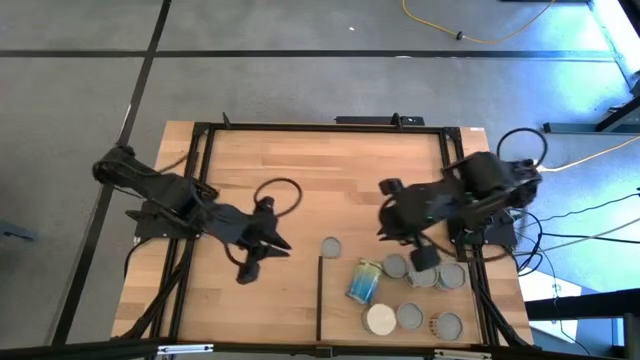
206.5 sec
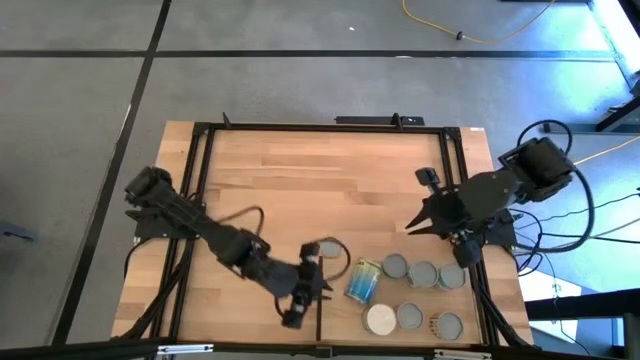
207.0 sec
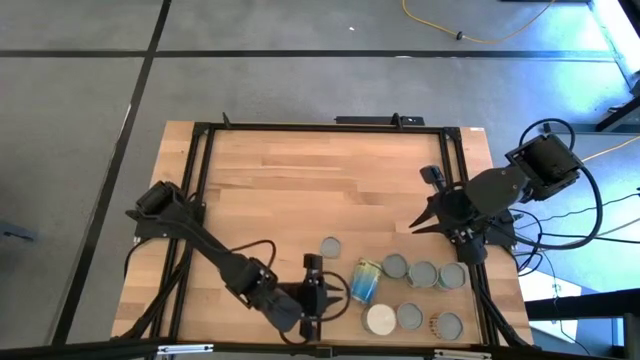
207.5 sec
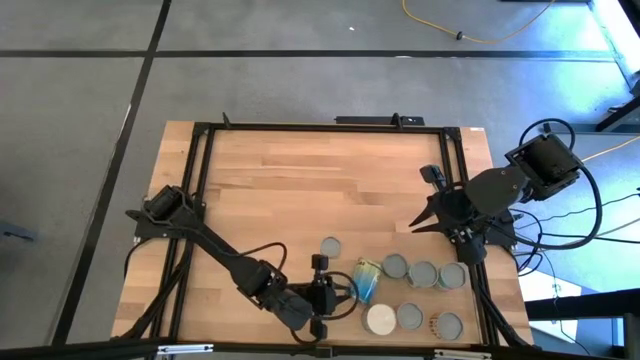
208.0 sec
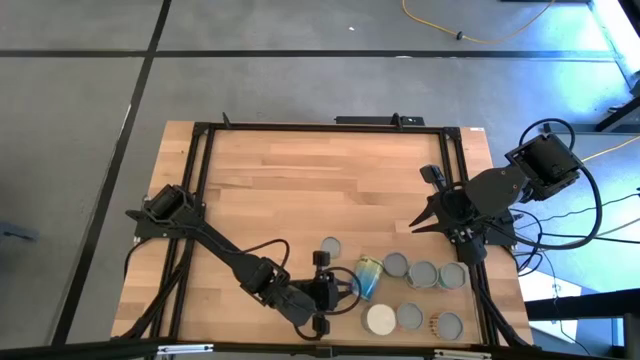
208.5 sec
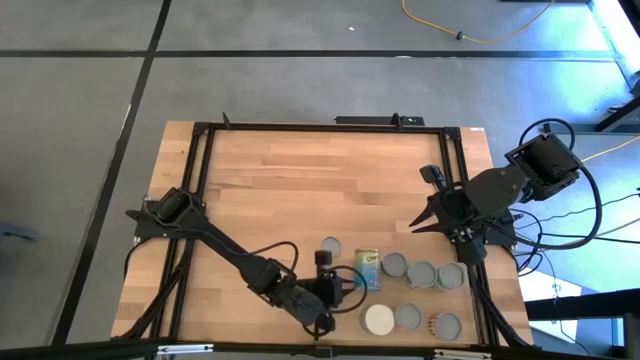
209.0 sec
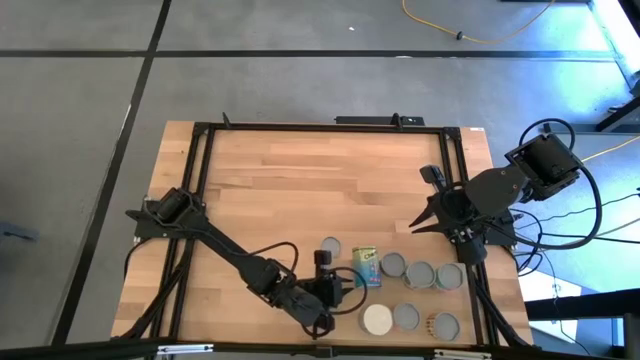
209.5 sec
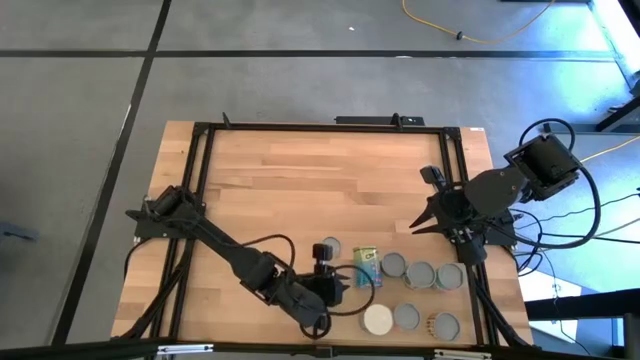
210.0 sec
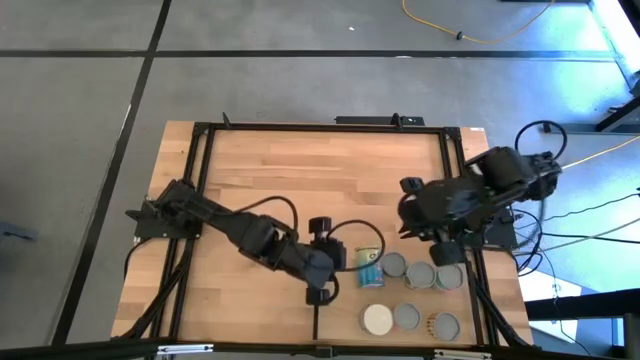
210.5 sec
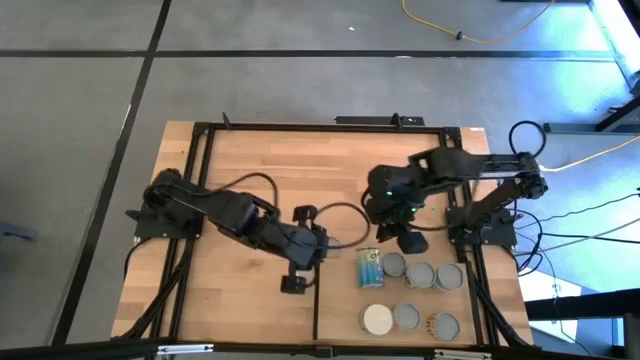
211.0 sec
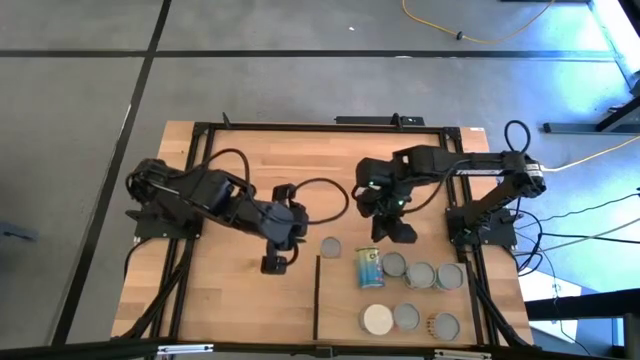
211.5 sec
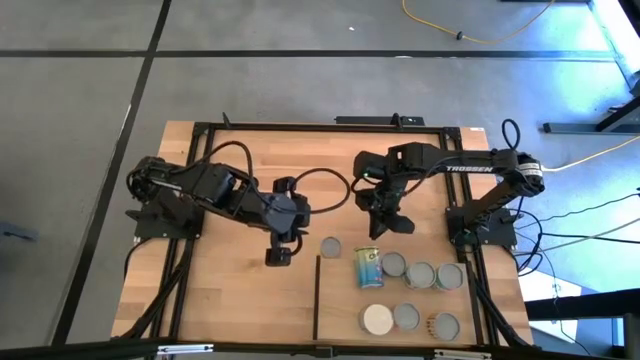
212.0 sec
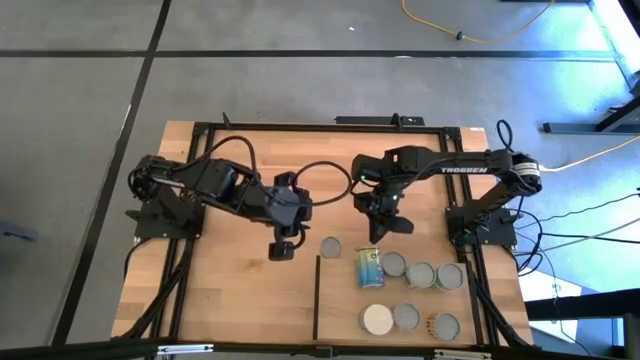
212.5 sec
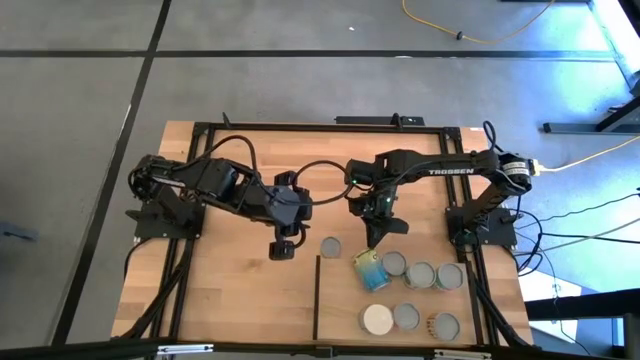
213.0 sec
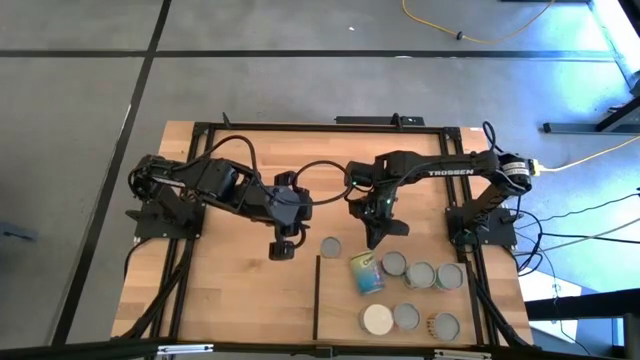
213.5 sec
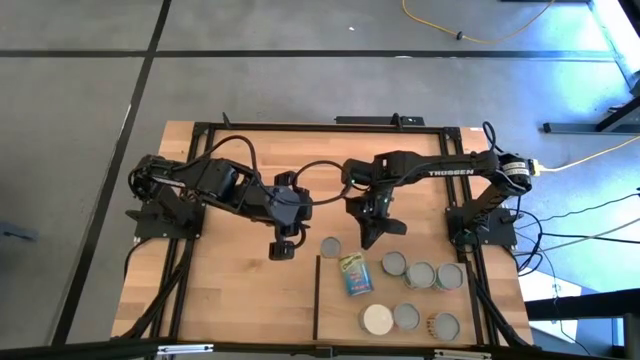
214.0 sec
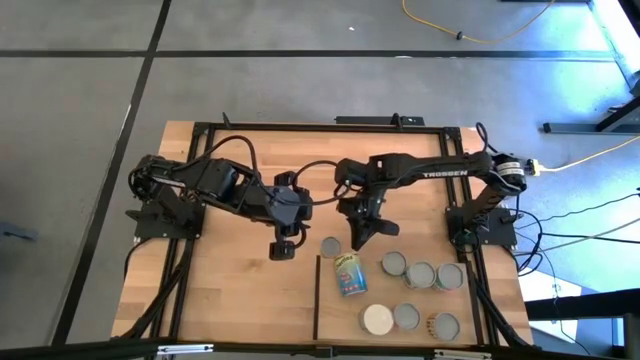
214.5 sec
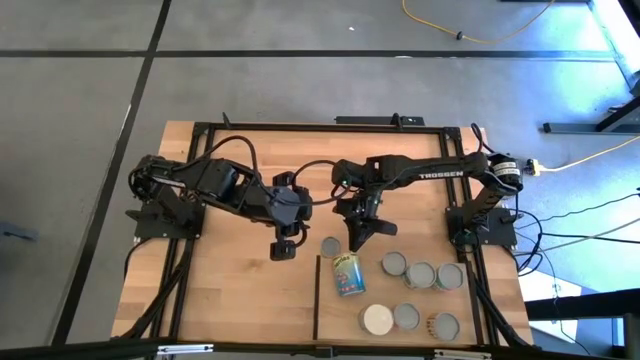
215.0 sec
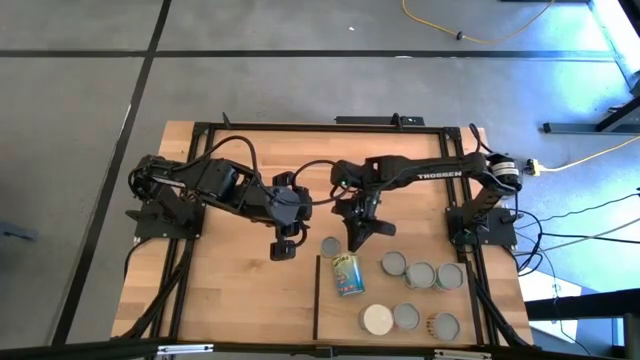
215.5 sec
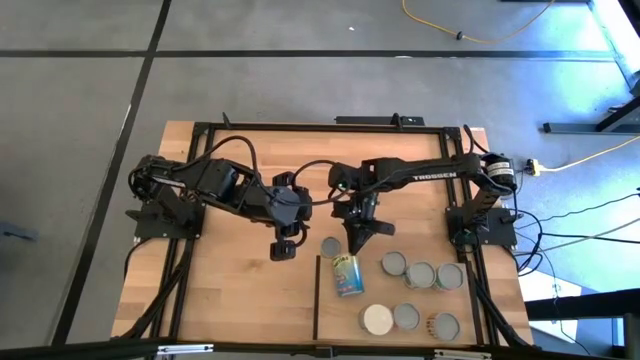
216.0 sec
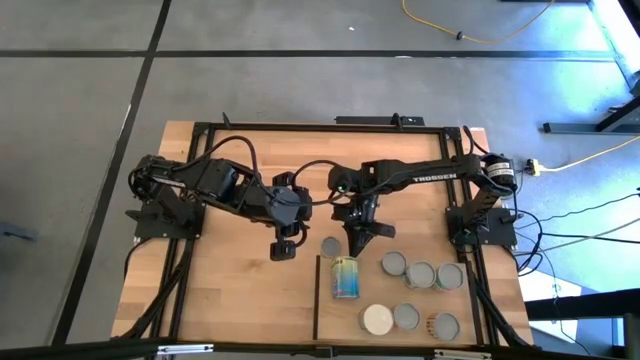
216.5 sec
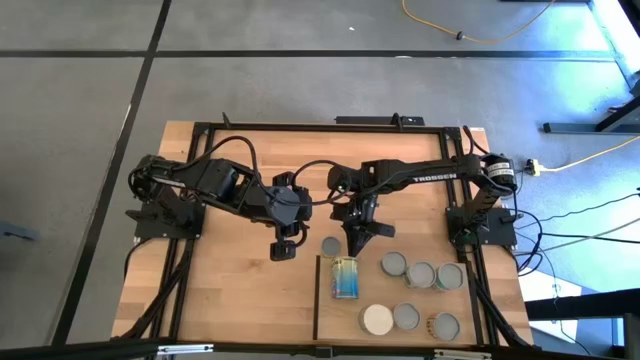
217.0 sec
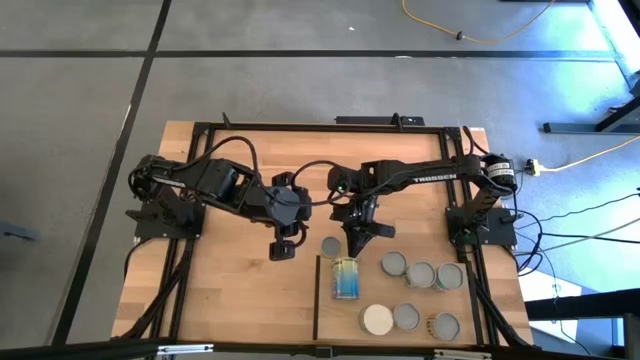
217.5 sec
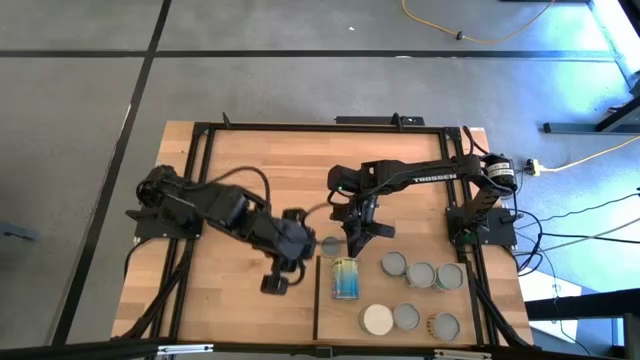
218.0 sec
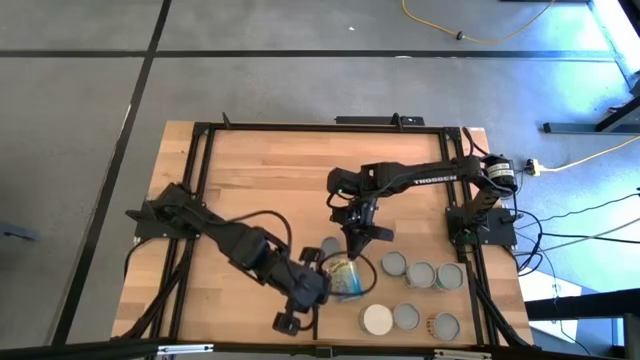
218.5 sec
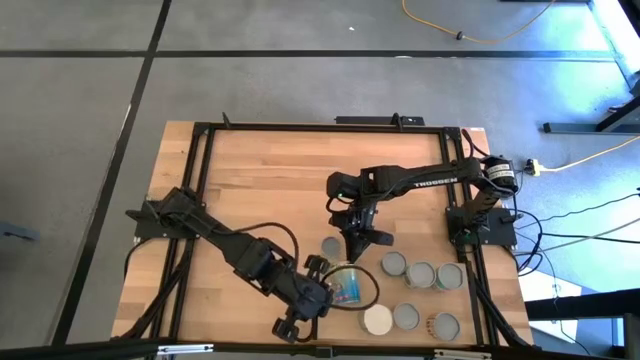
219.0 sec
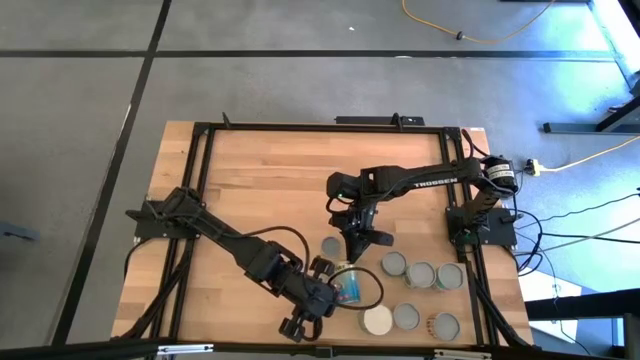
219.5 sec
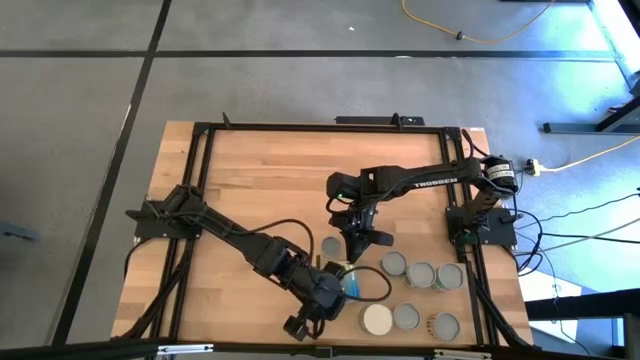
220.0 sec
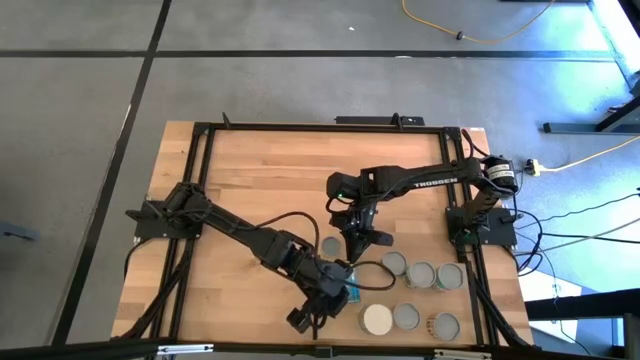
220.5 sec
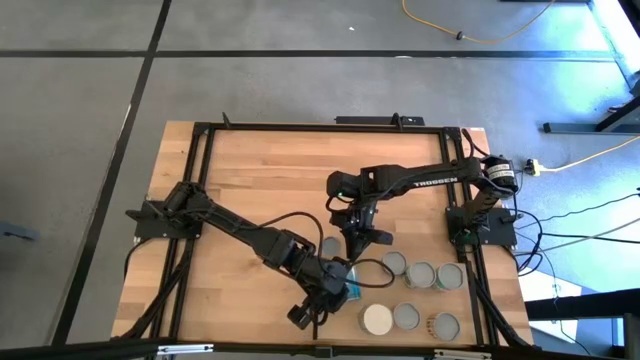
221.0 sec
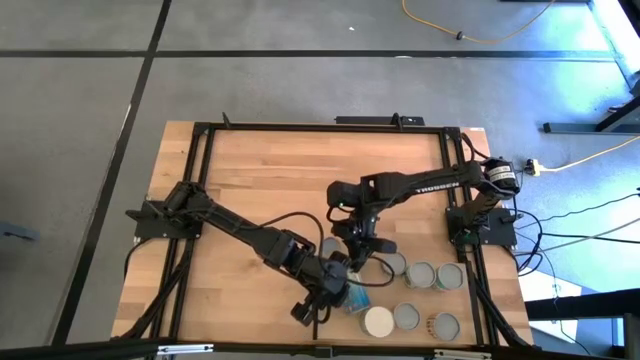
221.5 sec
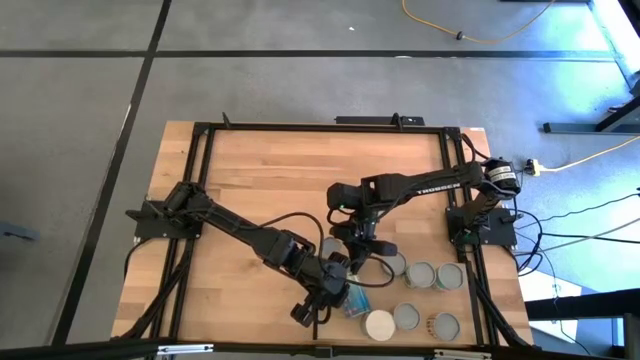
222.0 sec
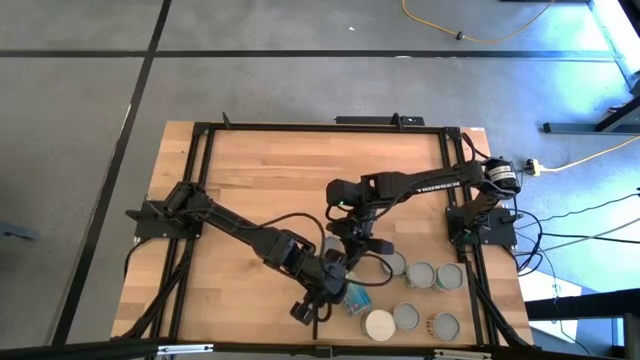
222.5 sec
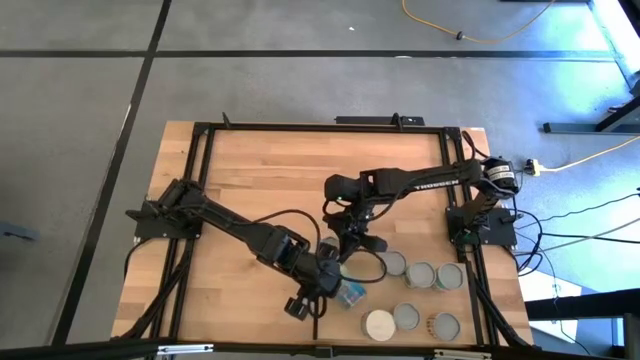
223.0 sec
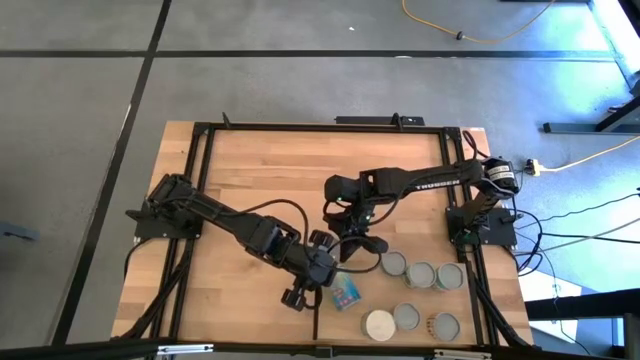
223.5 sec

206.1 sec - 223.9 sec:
Task: Pick and place cans onto a shelf
Put the blue canned cherries on the shelf

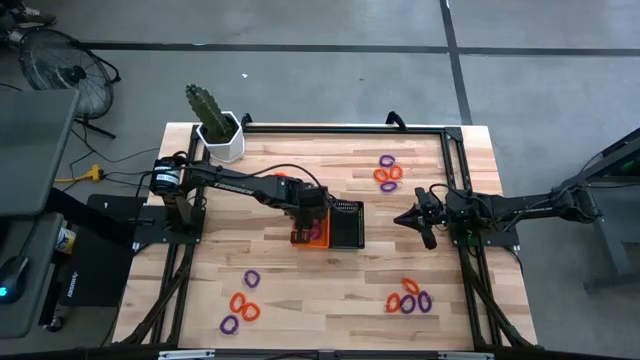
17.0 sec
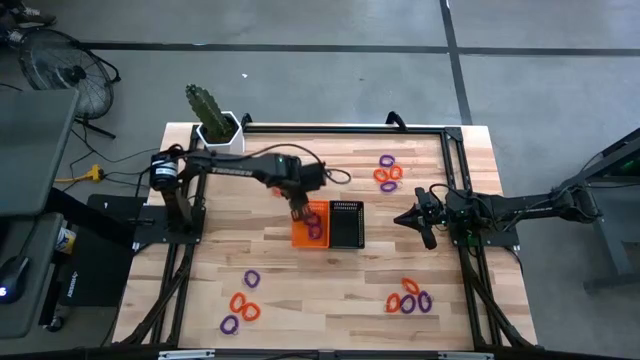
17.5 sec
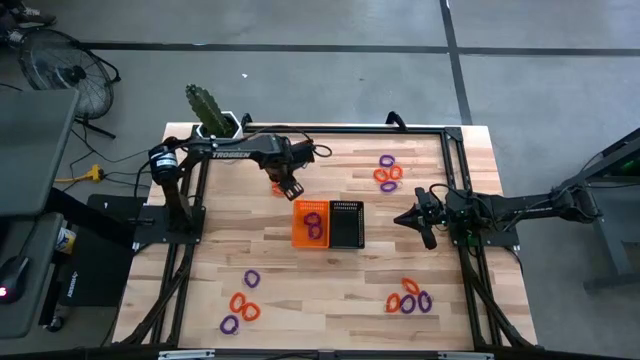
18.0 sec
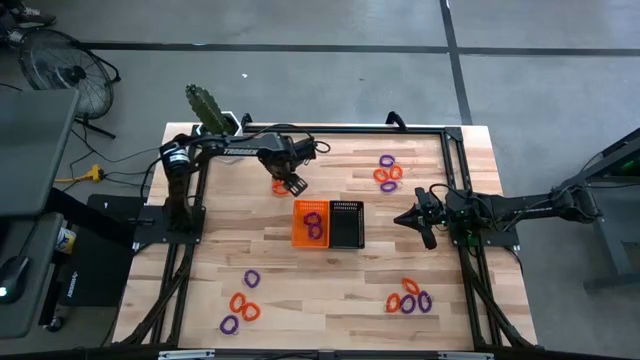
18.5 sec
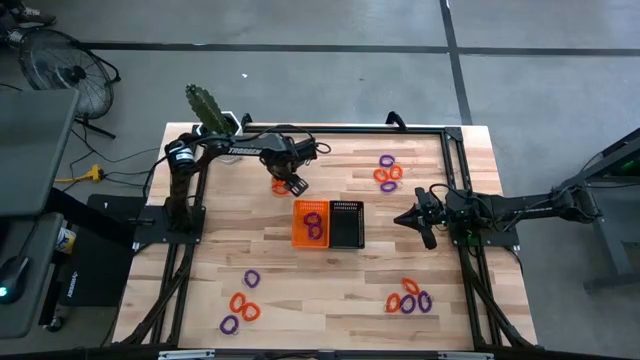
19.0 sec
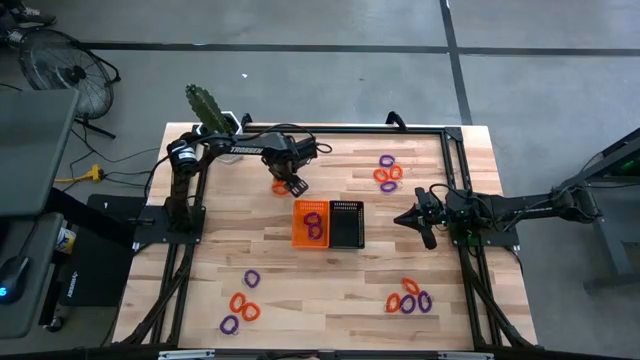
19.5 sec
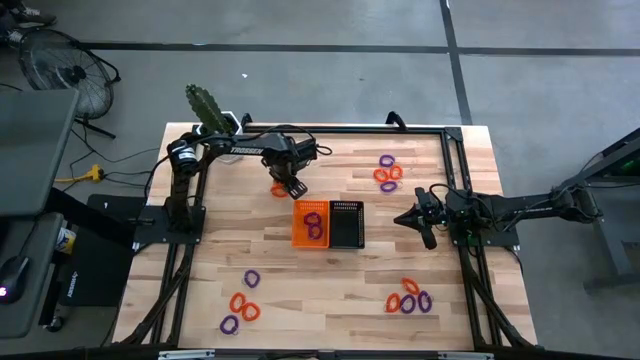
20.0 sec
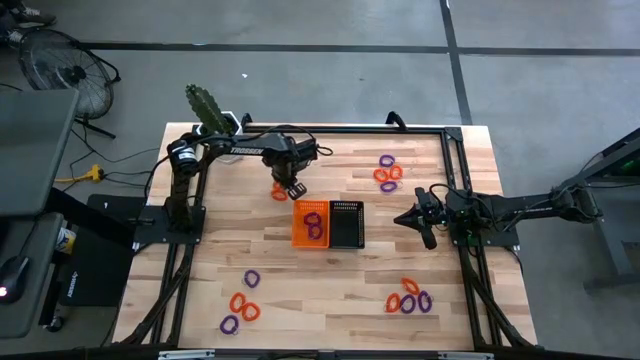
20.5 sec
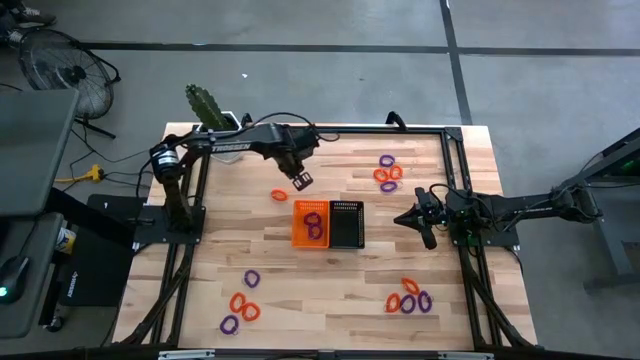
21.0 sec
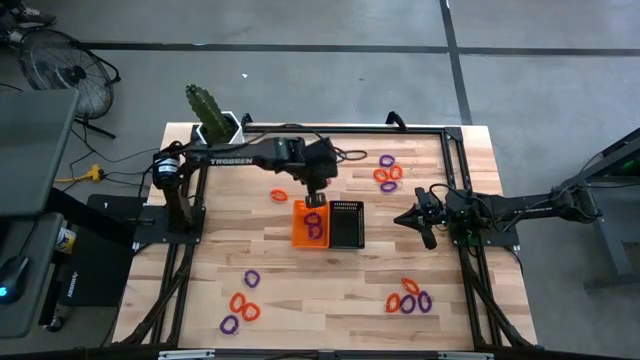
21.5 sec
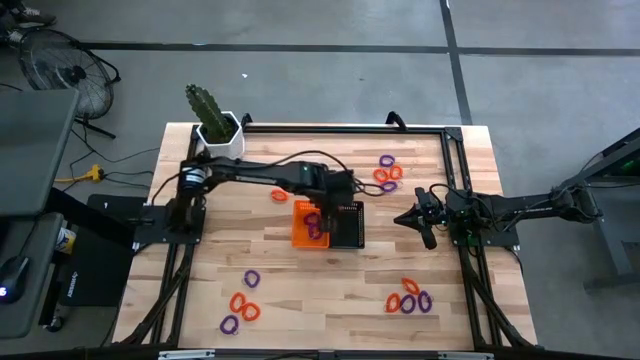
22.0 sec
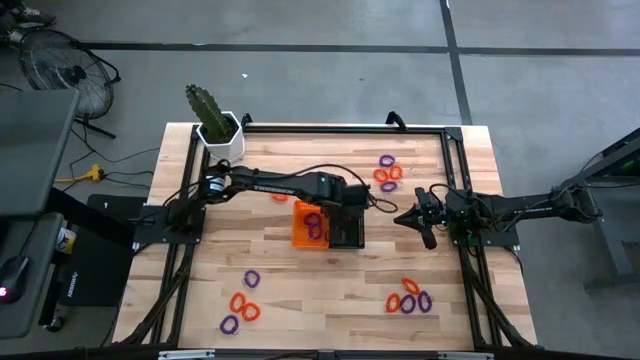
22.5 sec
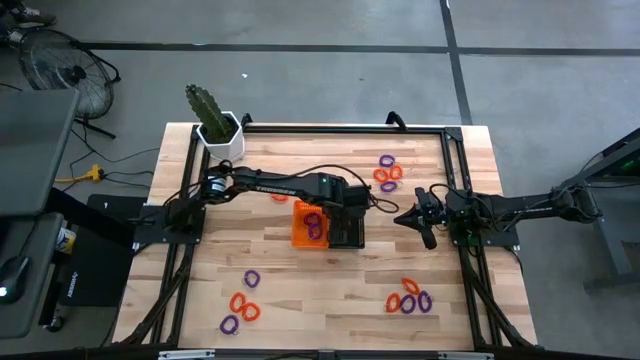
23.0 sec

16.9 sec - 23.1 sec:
Task: Sort spring keychains
Put the orange spring keychain into the black bin
